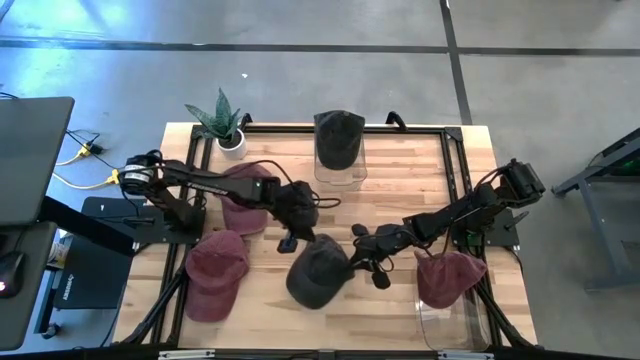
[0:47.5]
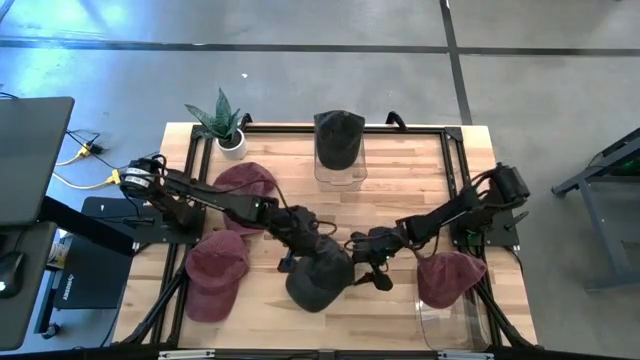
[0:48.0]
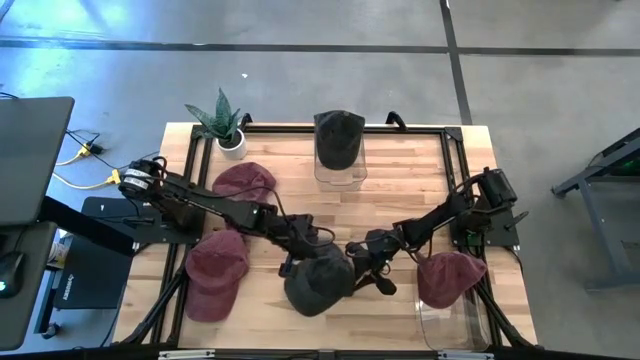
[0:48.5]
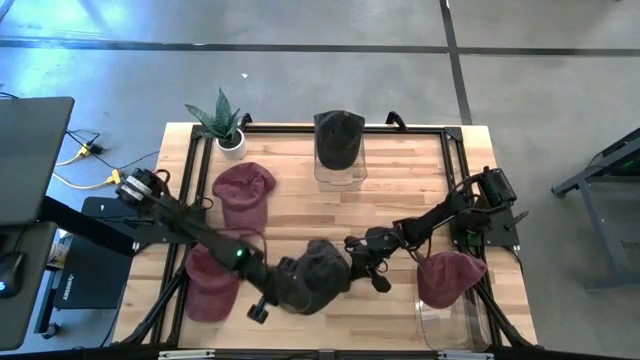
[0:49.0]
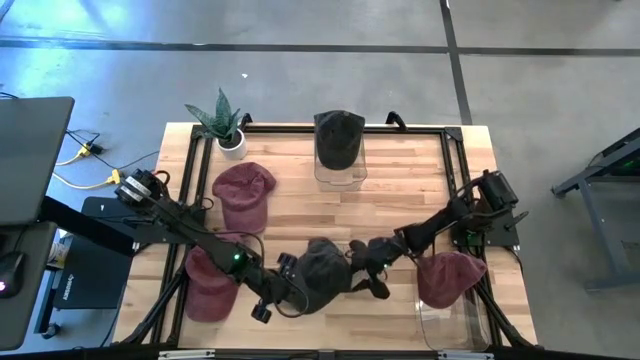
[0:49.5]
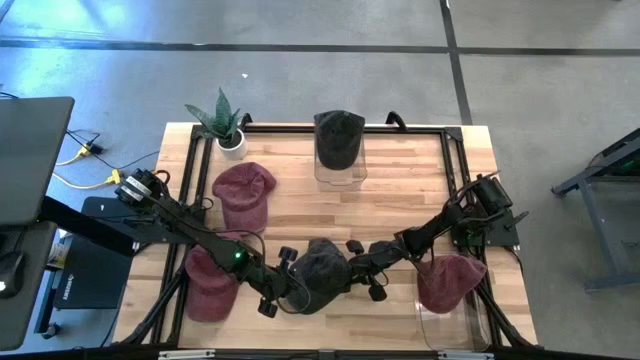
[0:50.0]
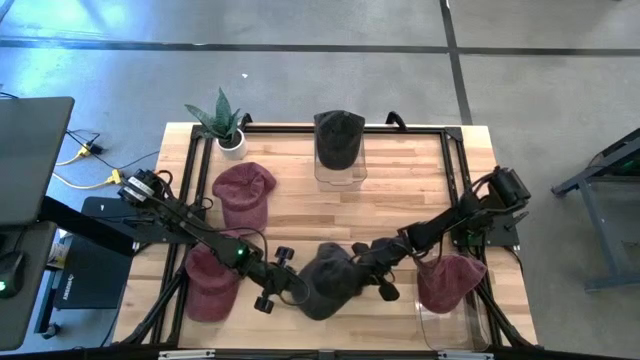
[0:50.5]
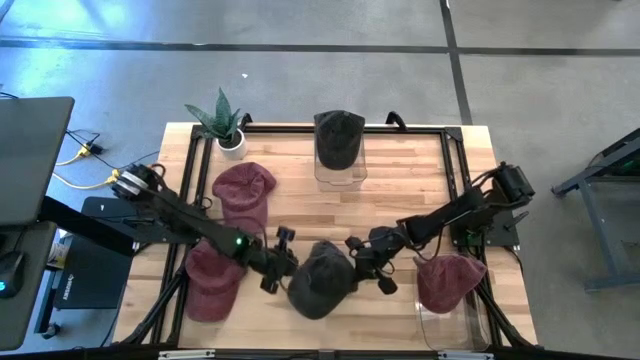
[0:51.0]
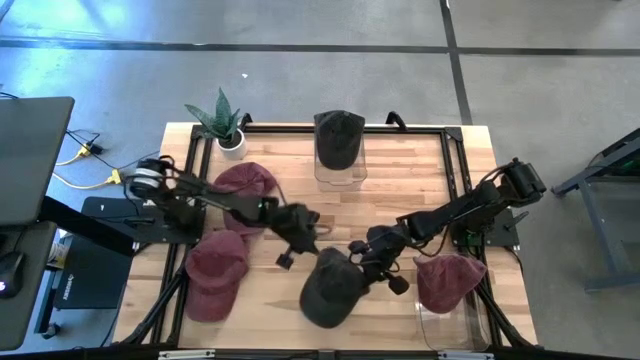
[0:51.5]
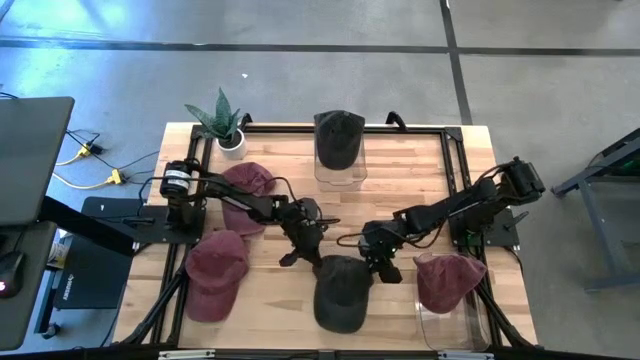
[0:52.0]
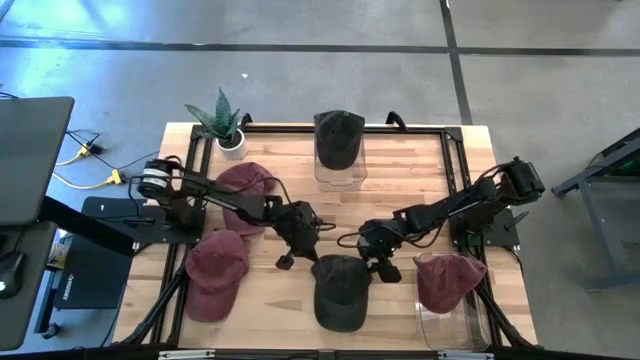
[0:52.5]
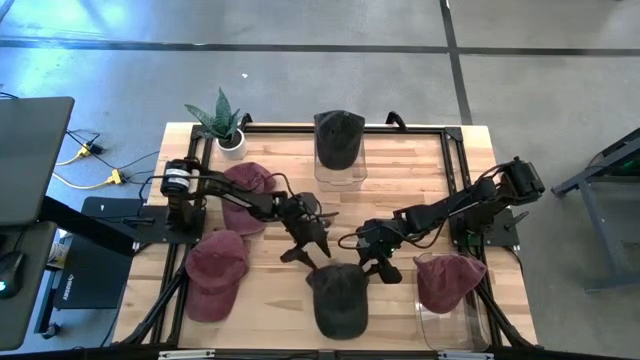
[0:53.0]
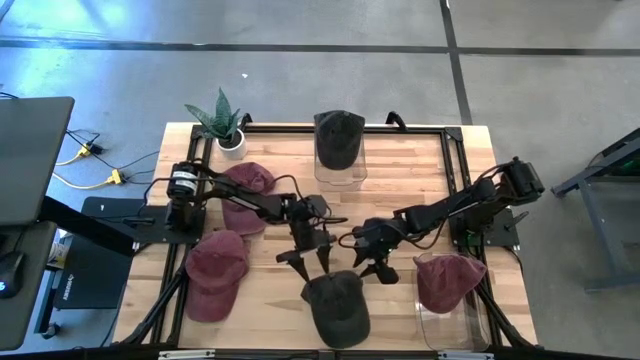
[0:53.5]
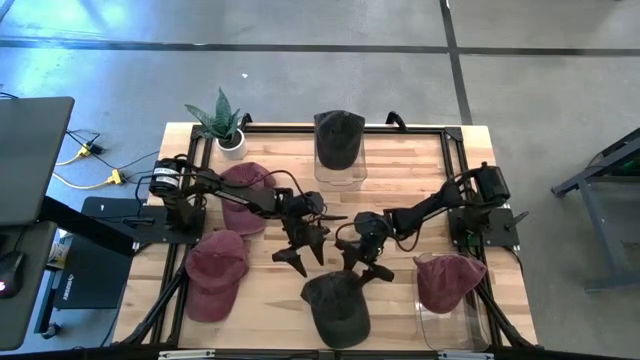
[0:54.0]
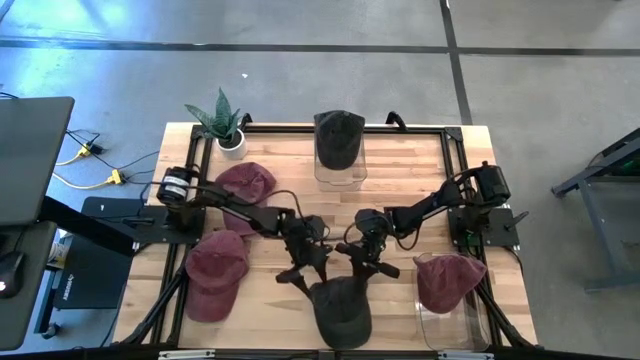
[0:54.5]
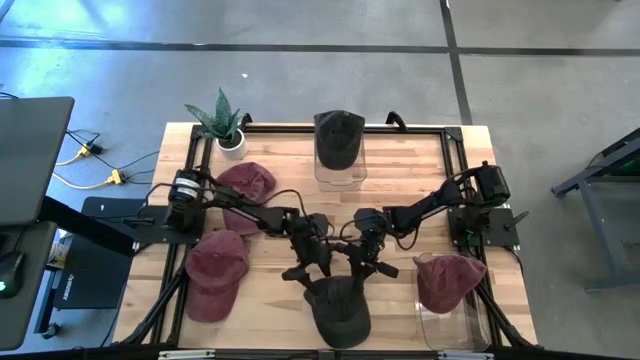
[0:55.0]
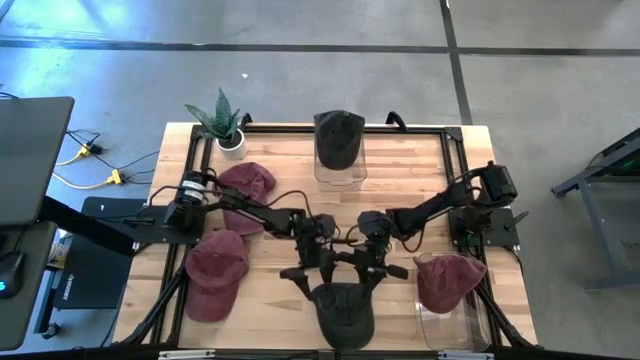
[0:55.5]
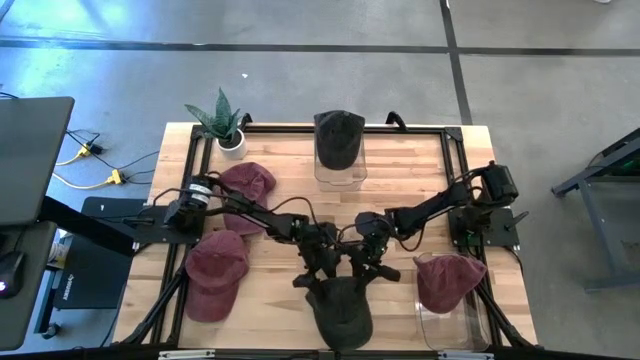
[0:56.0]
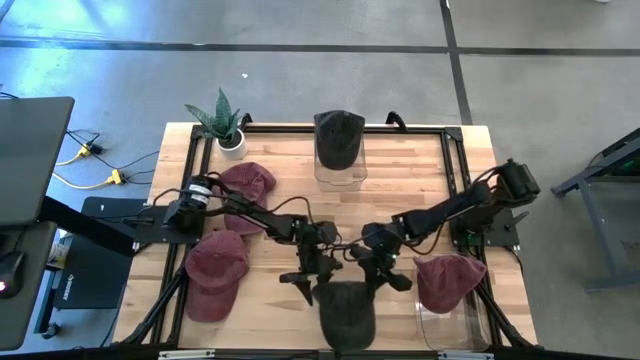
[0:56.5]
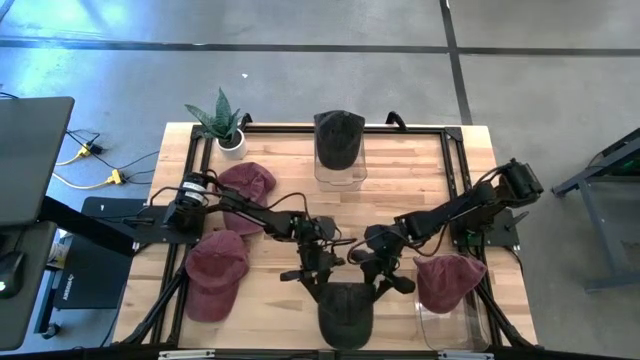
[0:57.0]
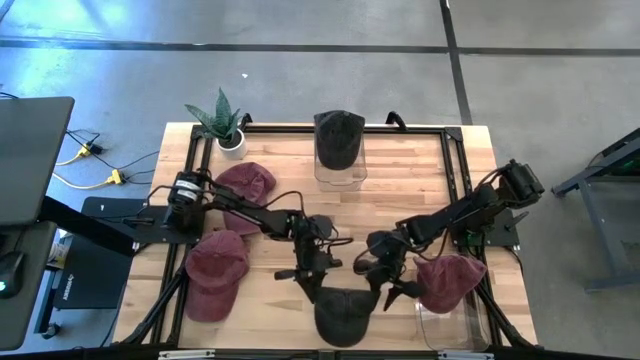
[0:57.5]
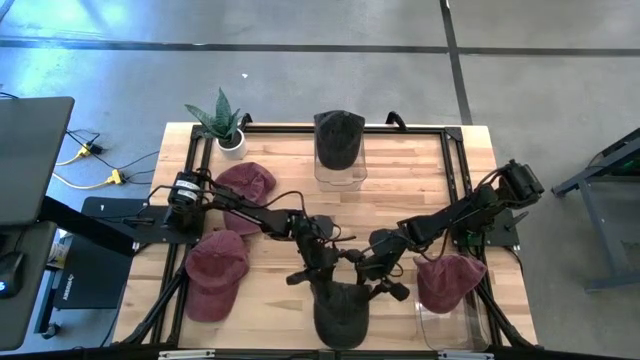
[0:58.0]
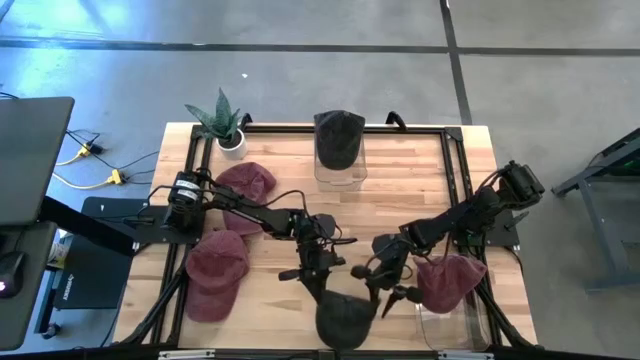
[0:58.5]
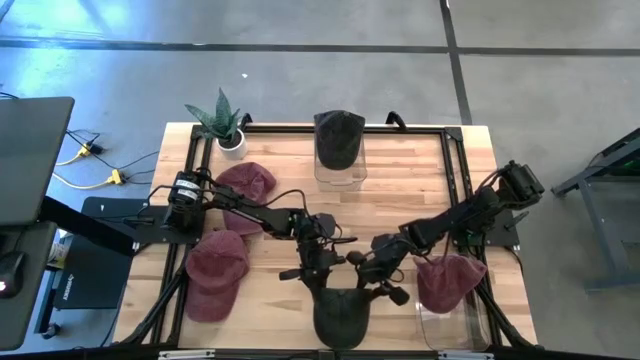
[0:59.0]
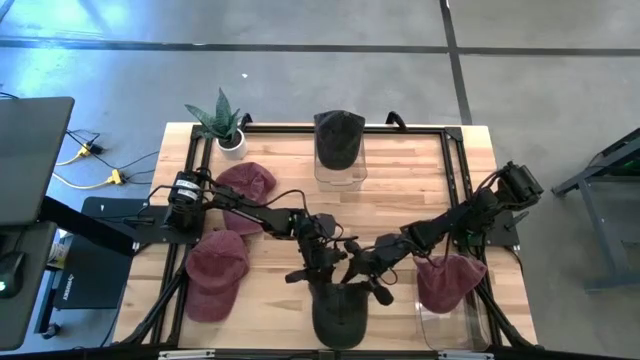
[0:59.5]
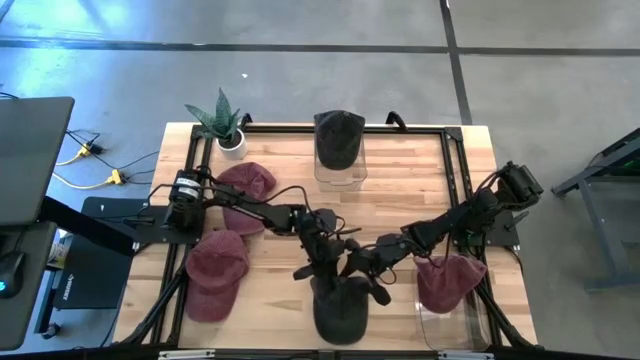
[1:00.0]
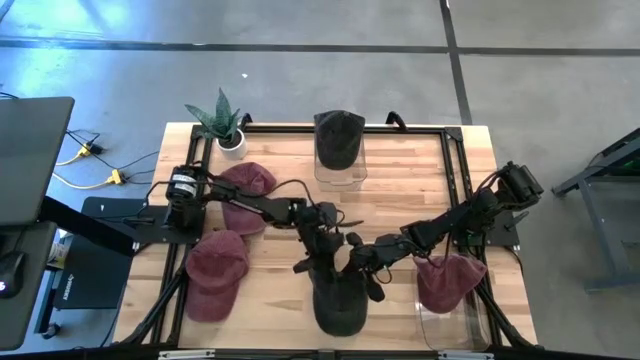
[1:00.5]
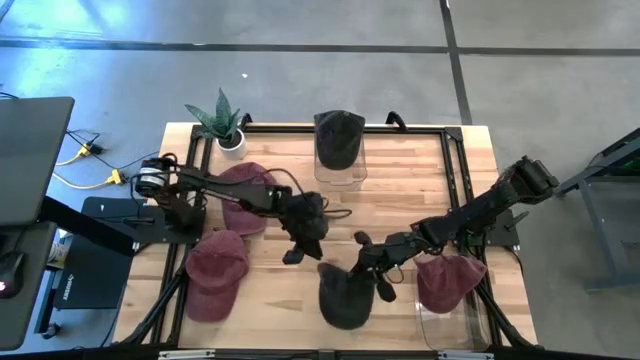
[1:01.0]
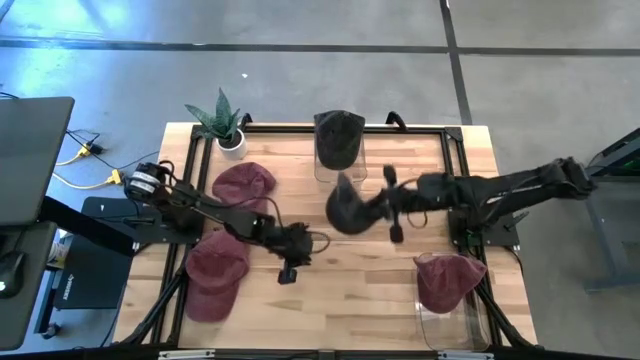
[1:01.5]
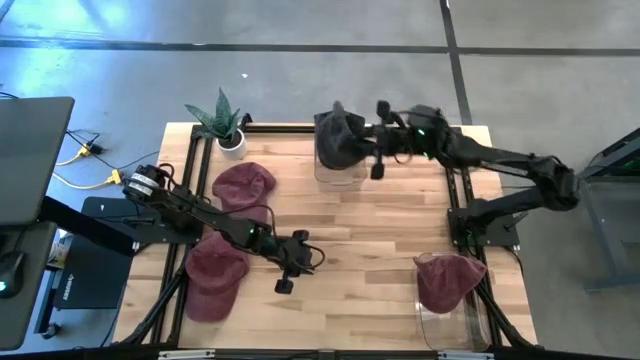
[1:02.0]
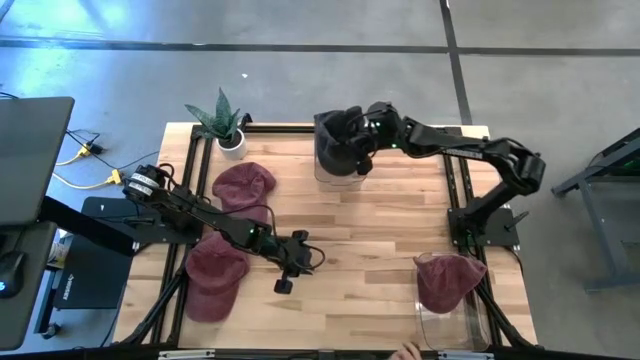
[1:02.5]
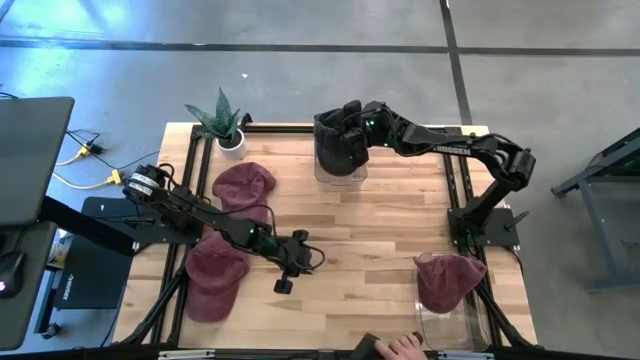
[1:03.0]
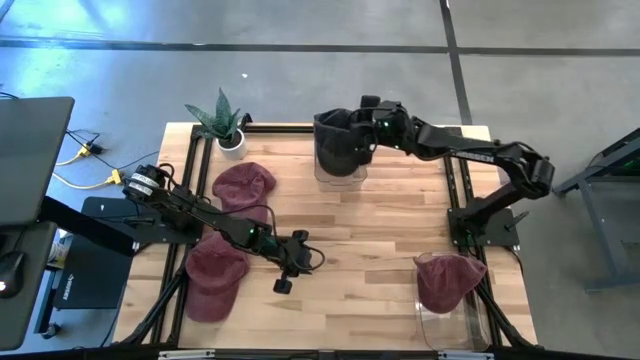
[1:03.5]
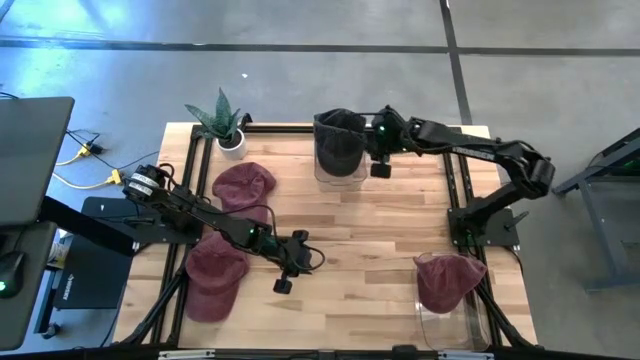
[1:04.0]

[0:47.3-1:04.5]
Task: Pick & Place hat
Put the black cap into the top transparent bin

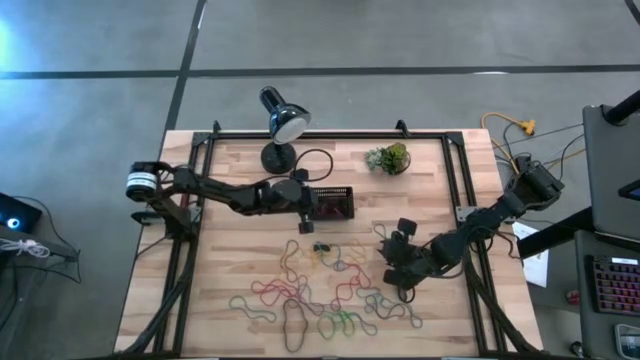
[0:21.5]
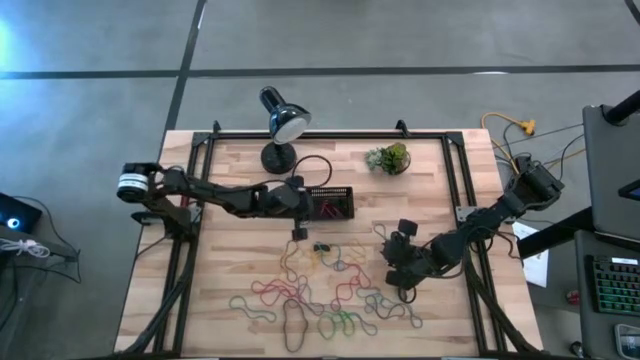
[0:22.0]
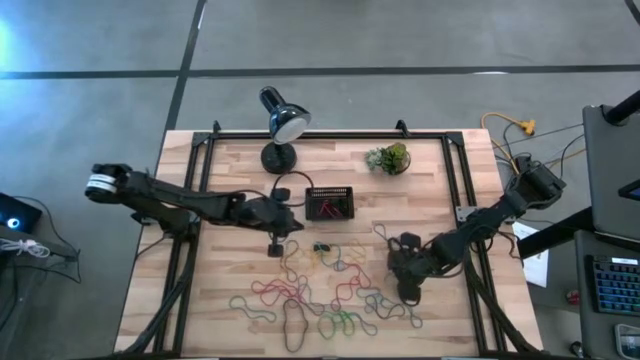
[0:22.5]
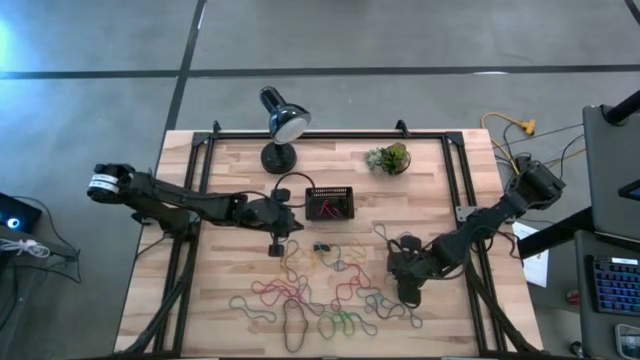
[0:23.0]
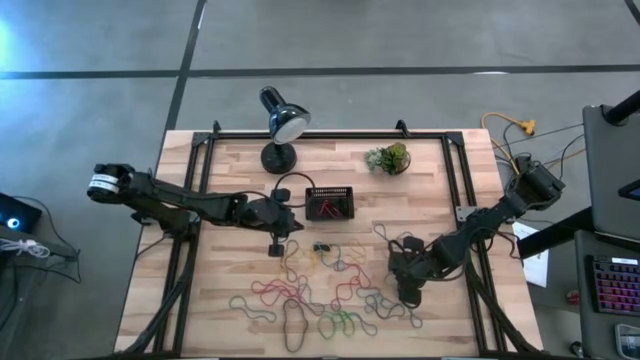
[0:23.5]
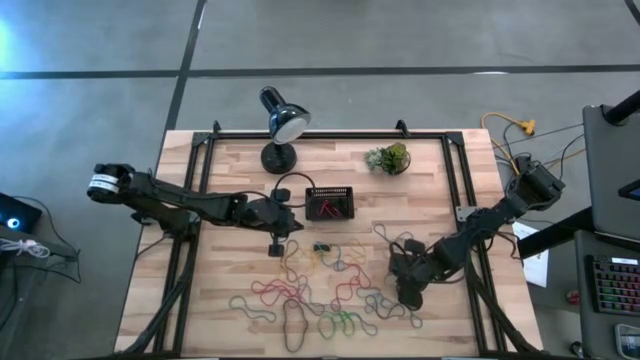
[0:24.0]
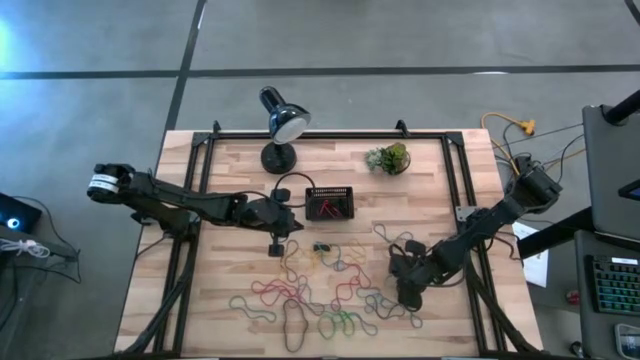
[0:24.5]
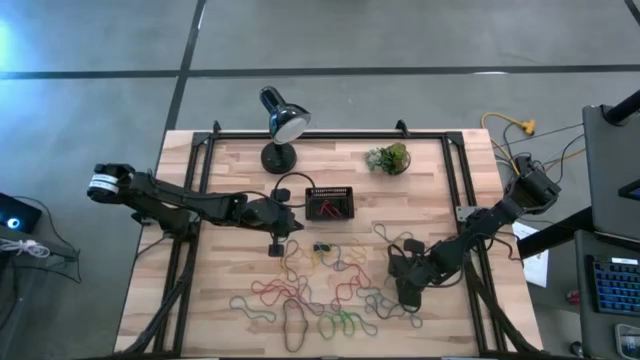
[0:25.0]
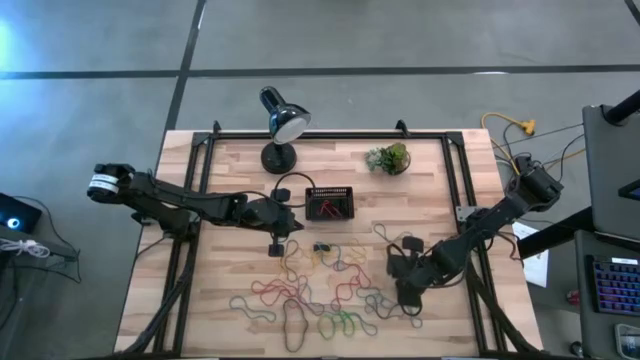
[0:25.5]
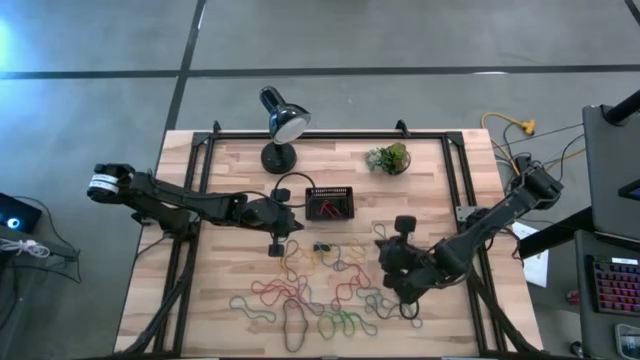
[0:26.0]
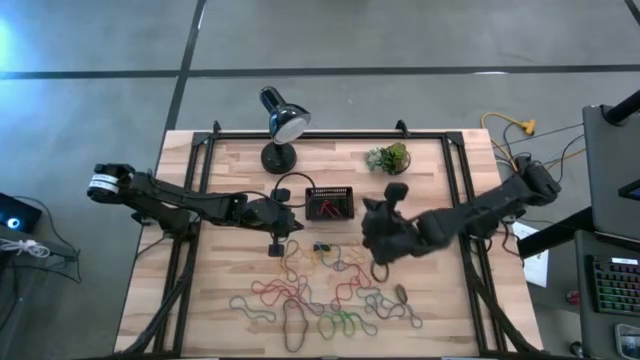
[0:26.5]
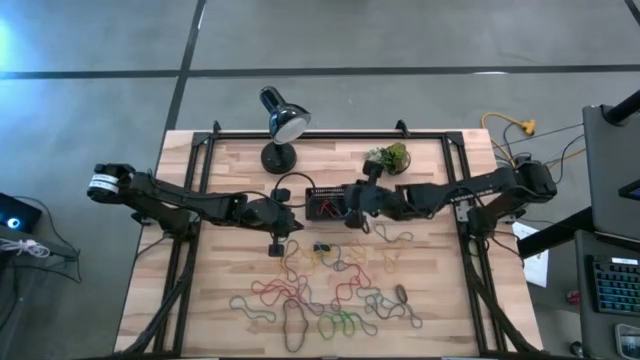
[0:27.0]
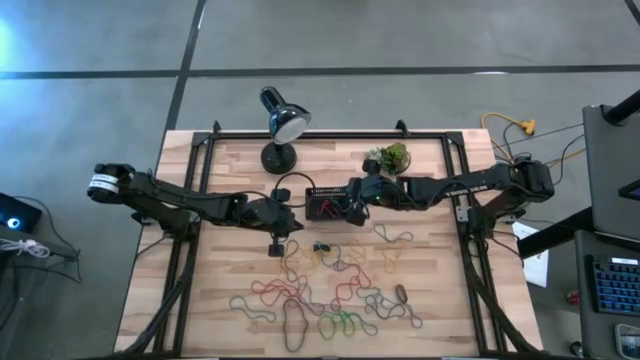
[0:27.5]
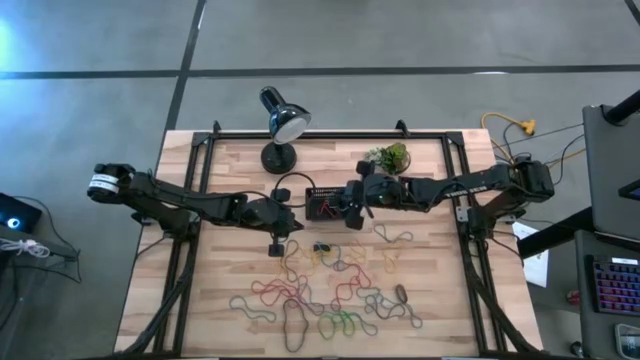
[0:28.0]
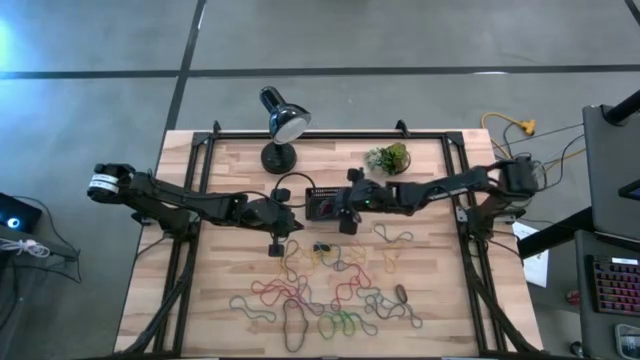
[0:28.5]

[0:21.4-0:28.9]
Task: Pick and place rubber bands into bin
Put the blue rubber band into the black bin
